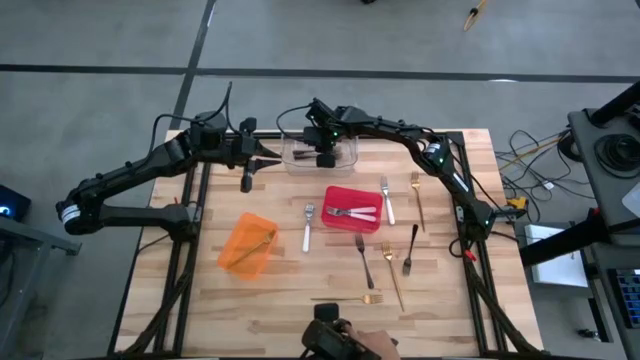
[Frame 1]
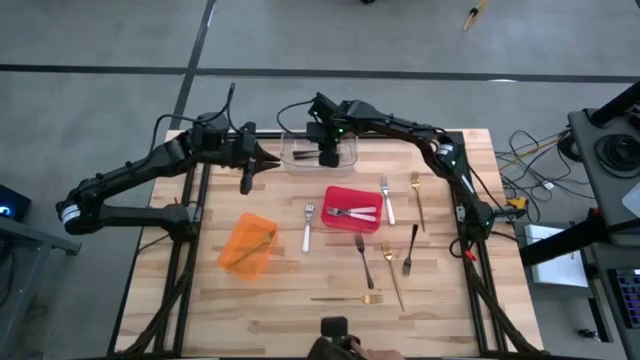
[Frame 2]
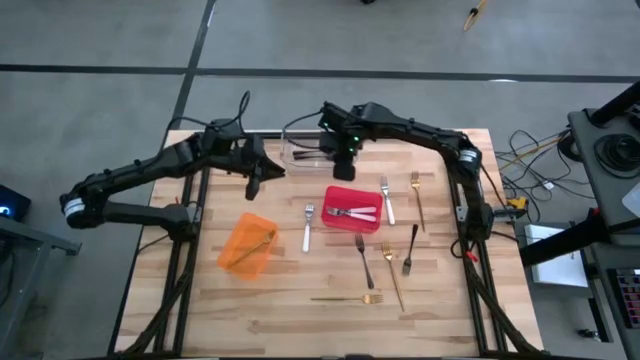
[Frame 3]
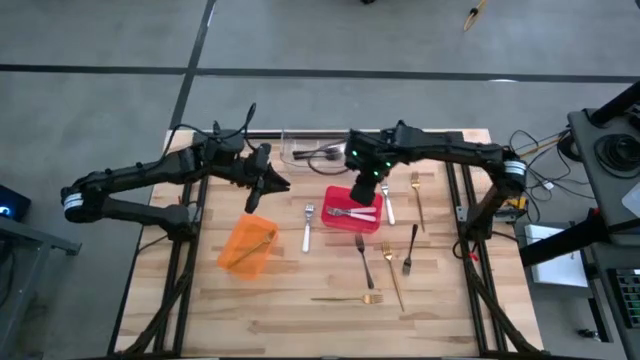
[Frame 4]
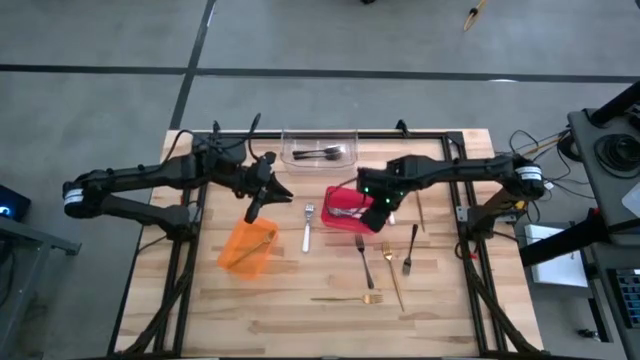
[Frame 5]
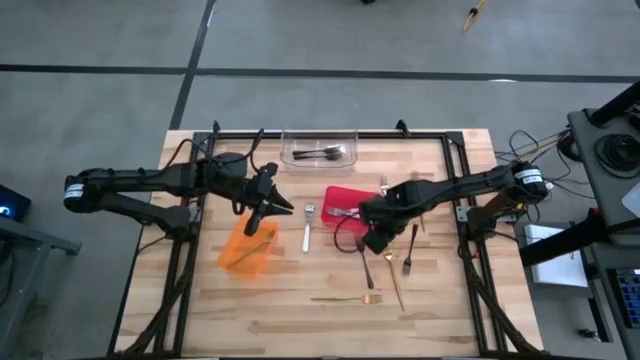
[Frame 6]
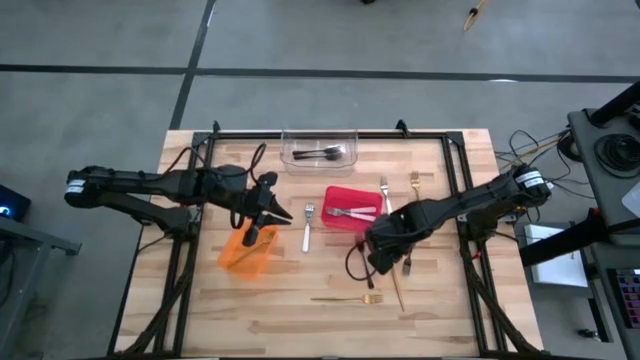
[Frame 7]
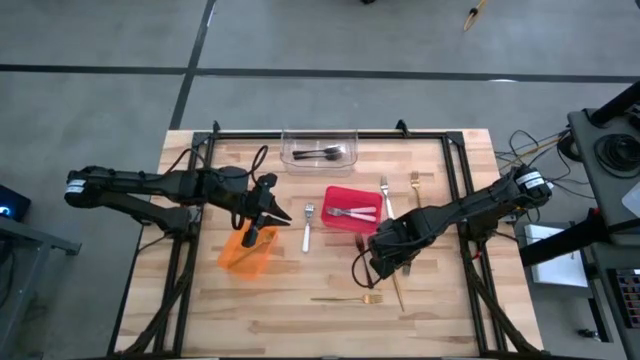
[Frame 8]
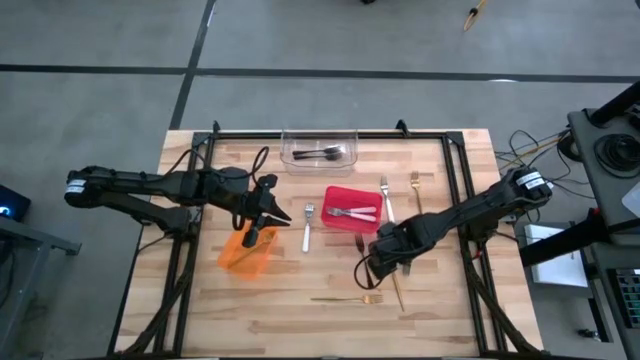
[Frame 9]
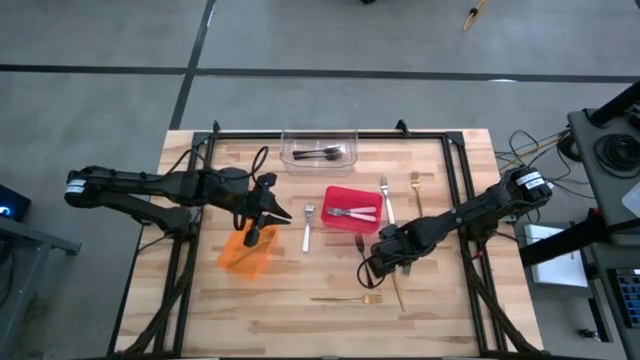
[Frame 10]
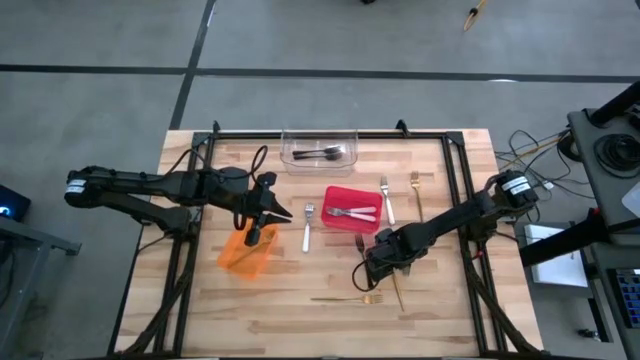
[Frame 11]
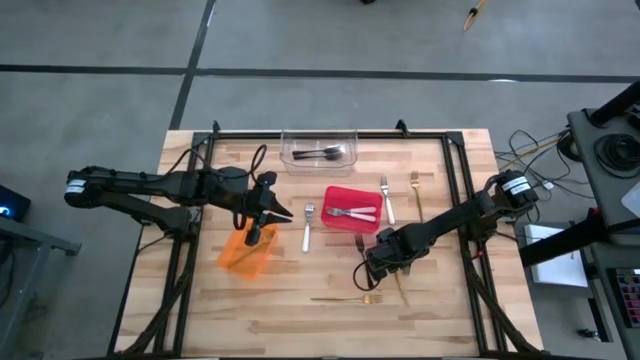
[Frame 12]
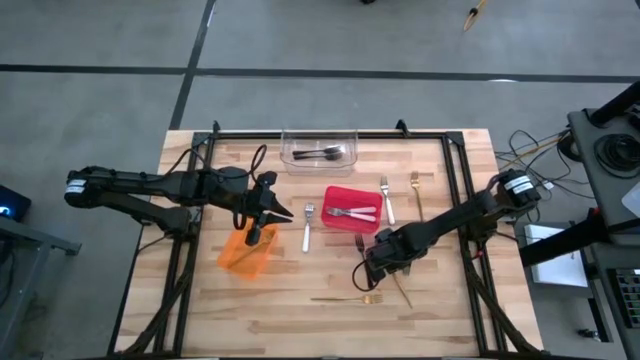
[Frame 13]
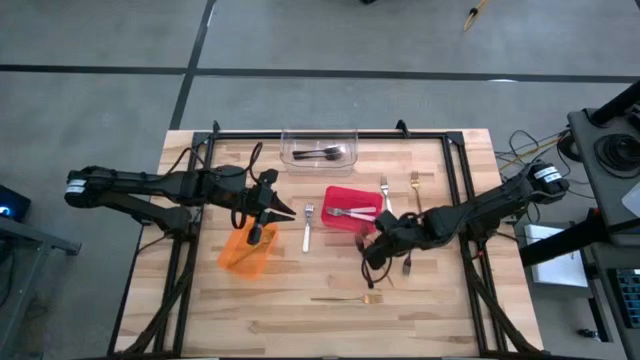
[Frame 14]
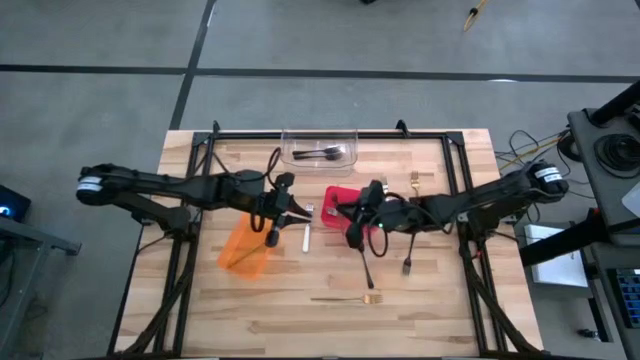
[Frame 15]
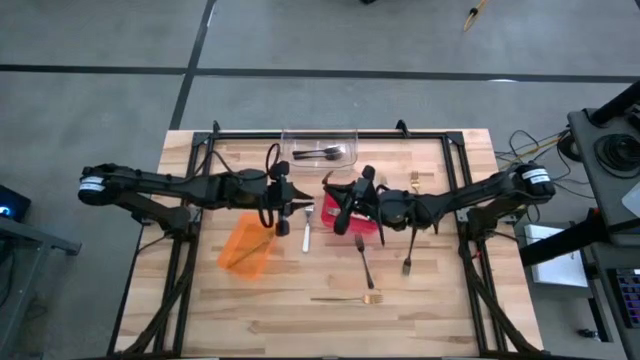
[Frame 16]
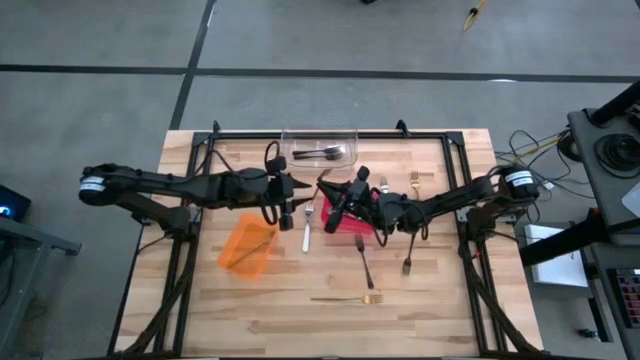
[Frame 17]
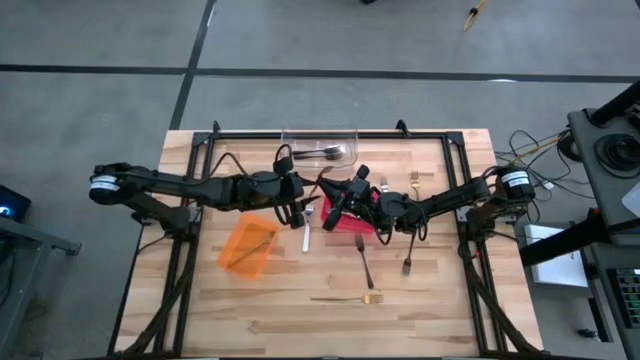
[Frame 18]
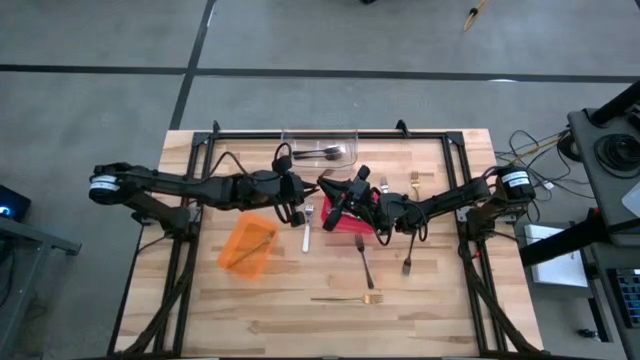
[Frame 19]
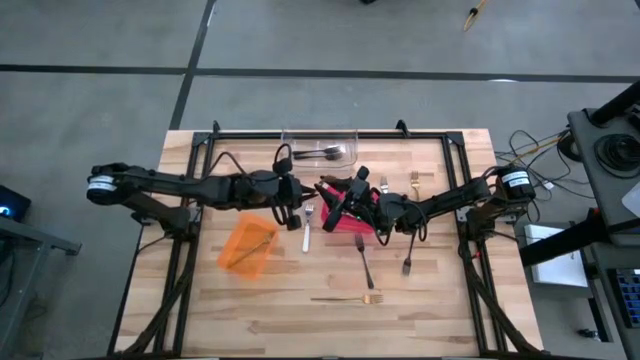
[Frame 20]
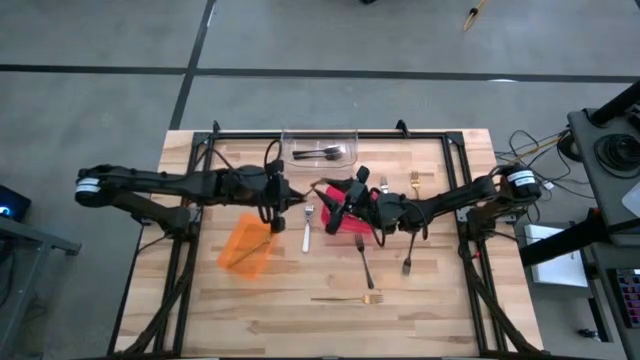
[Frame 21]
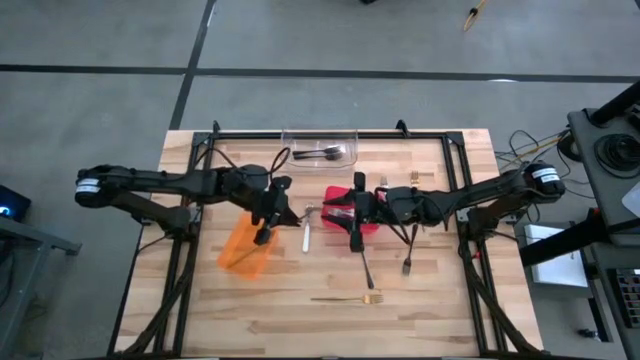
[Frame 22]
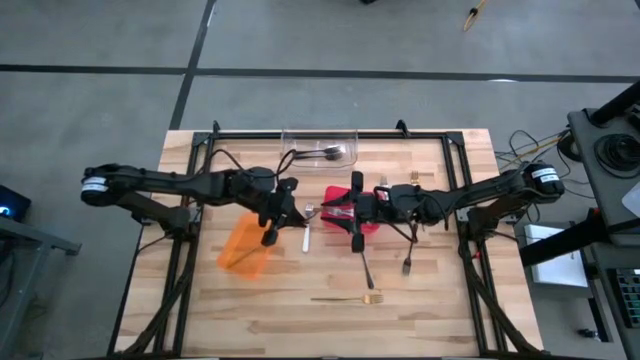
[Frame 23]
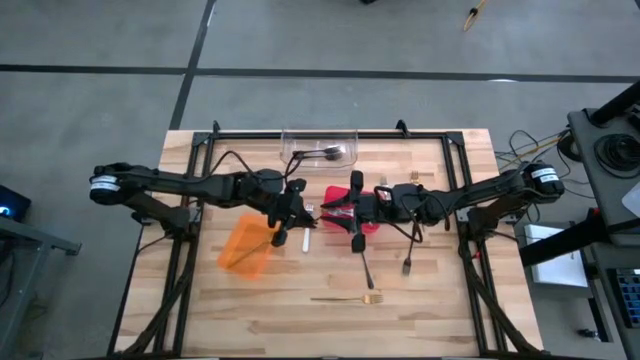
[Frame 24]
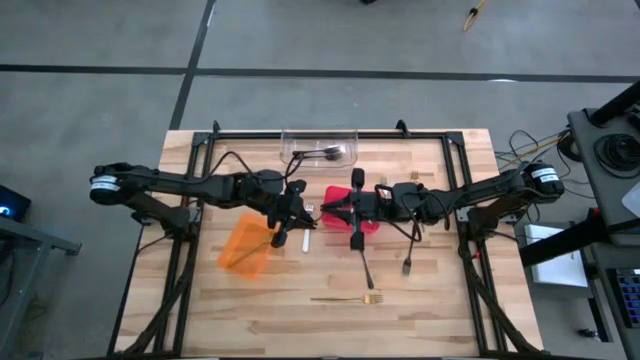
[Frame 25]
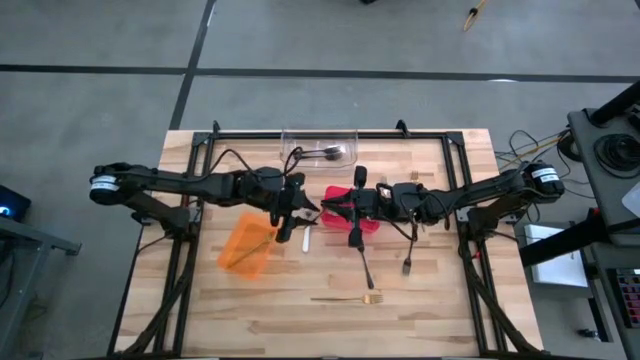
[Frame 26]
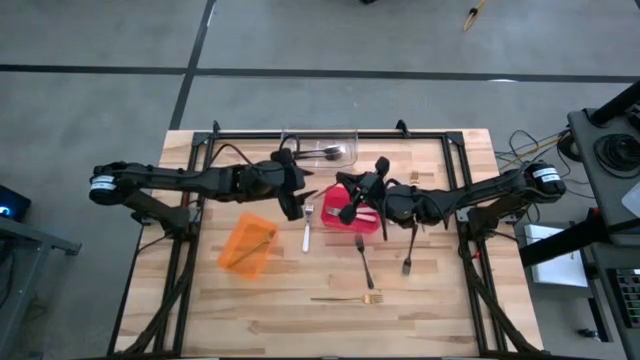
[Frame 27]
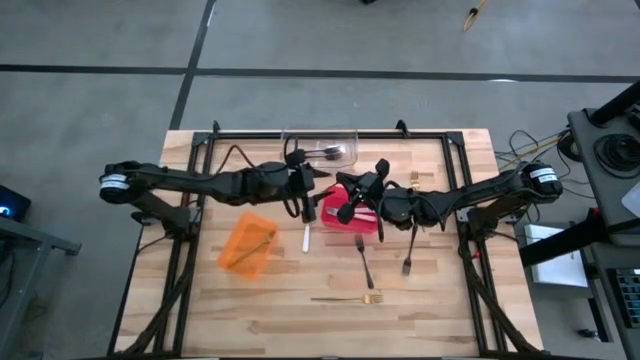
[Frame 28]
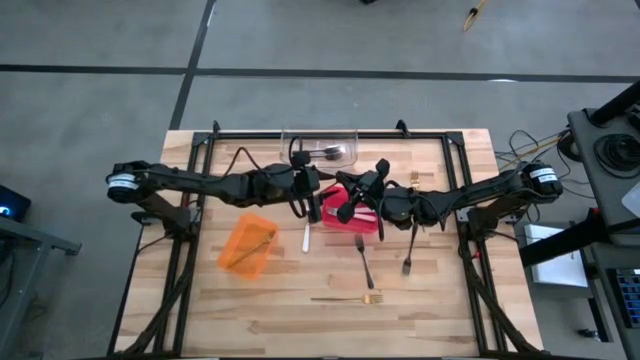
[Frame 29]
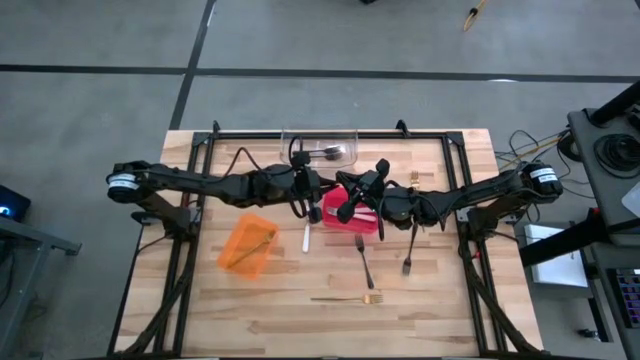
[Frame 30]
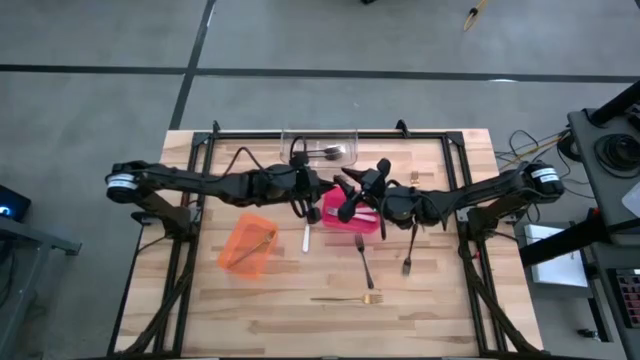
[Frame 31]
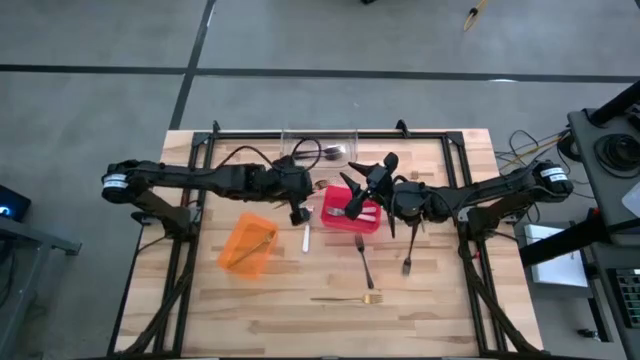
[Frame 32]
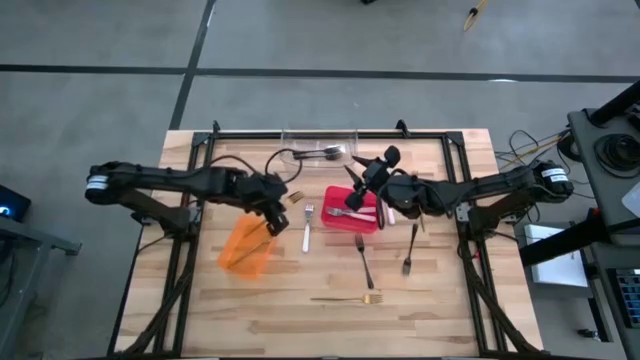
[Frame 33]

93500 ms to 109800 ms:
Task: Sort silverware by color (type)
Put the gold fork into the orange bin

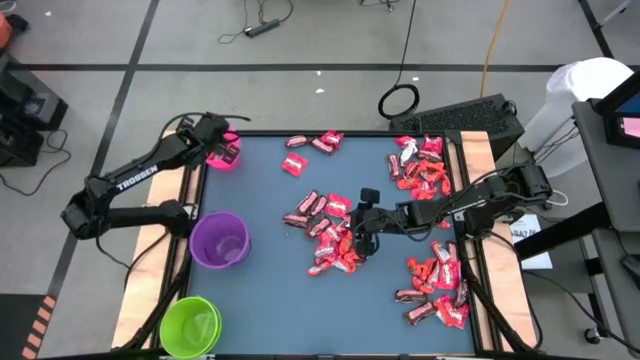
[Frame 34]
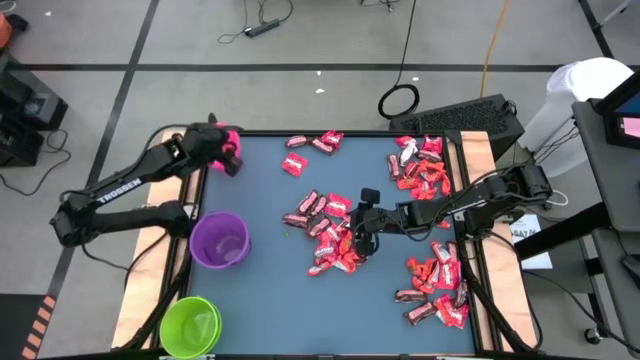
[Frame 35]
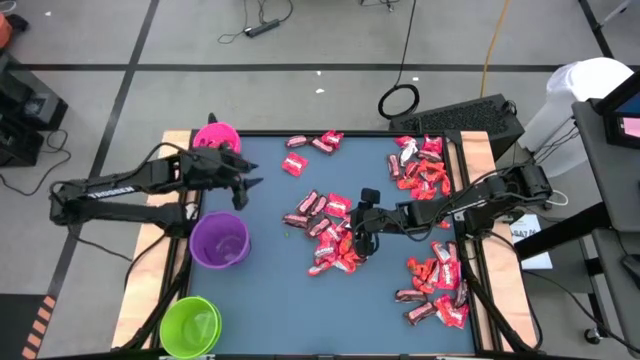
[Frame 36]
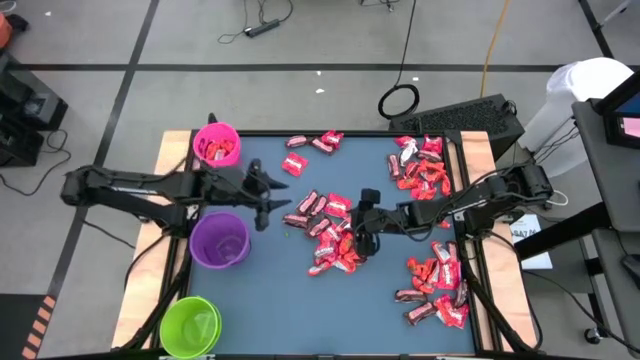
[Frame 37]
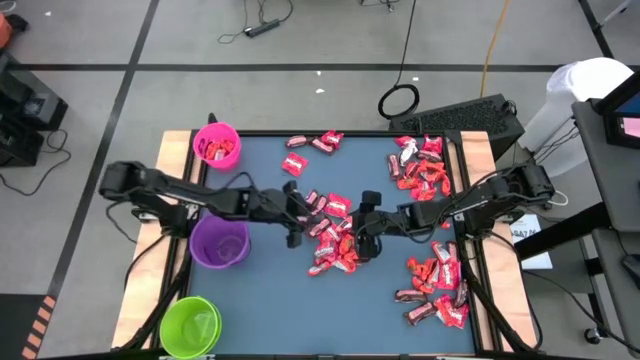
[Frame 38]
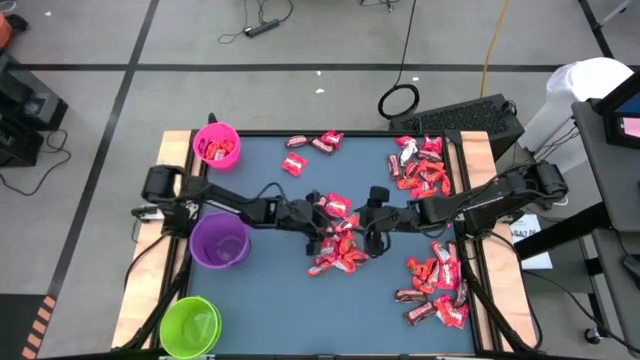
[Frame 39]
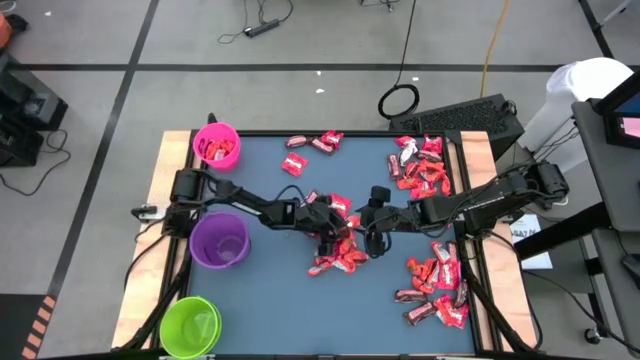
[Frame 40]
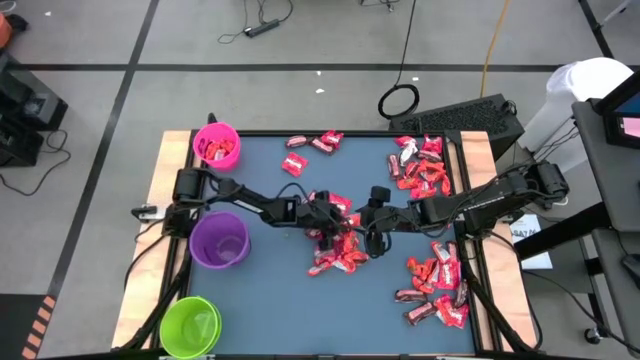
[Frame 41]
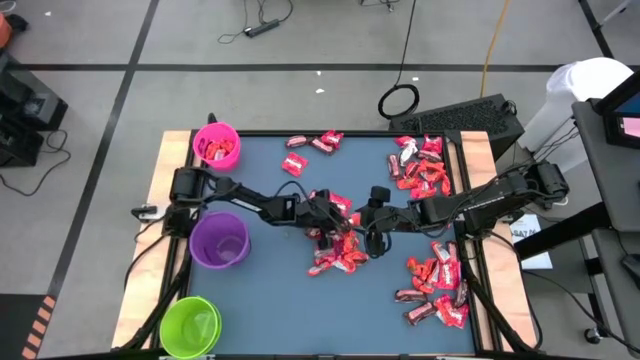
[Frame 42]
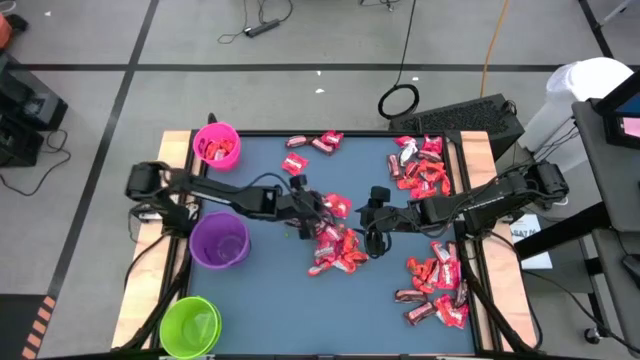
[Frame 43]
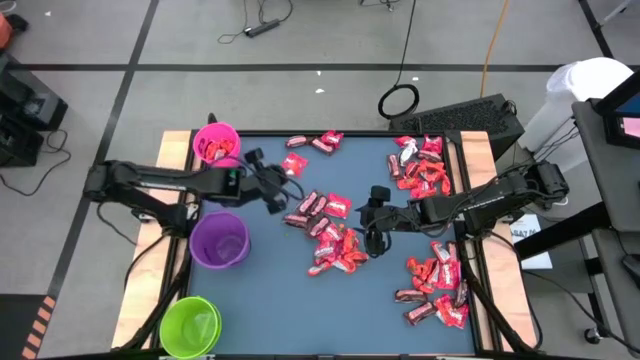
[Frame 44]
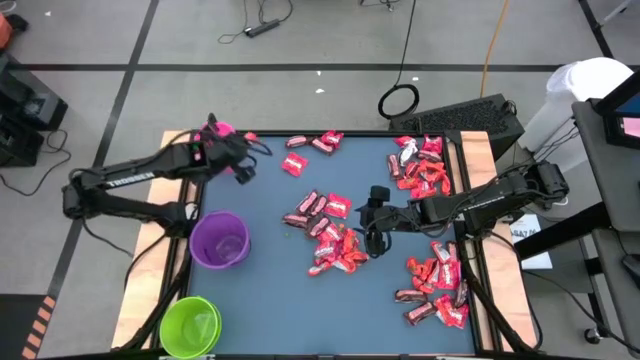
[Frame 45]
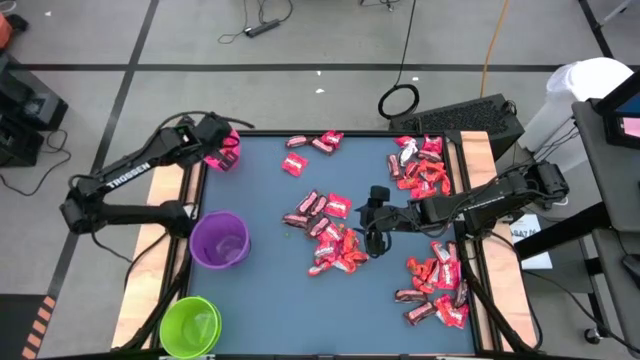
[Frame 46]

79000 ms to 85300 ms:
Task: Organize candy in baskets
Put the orange chocolate into the pink bucket
